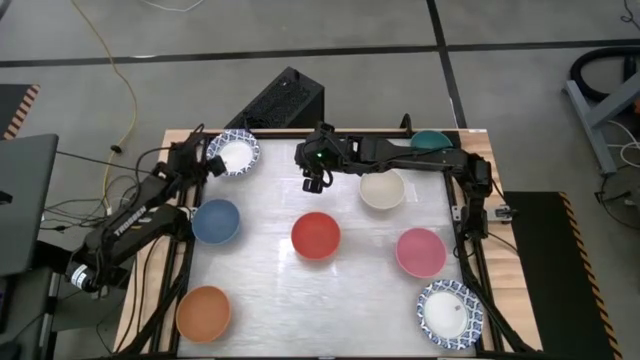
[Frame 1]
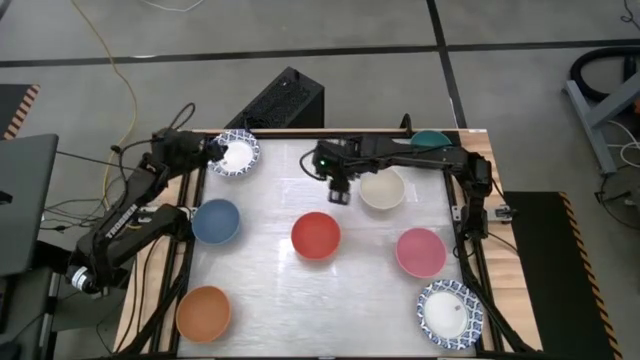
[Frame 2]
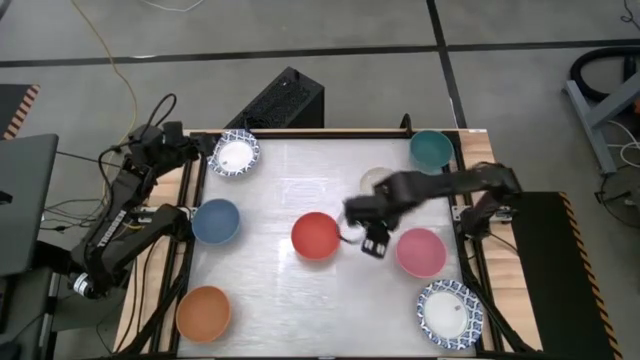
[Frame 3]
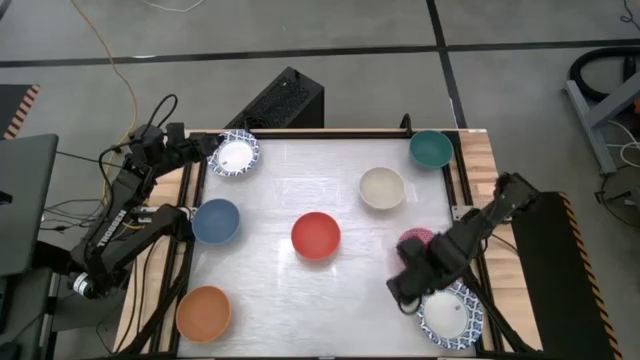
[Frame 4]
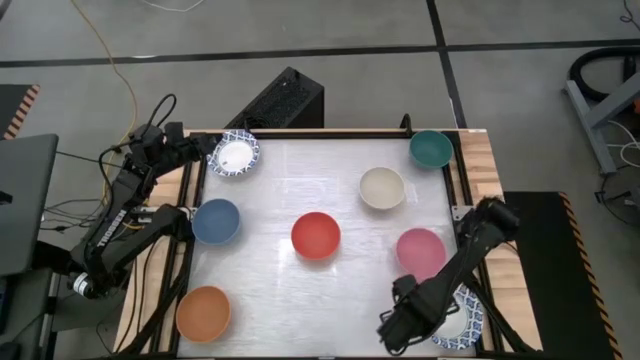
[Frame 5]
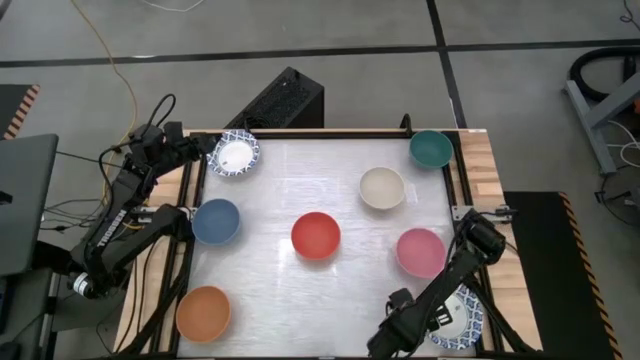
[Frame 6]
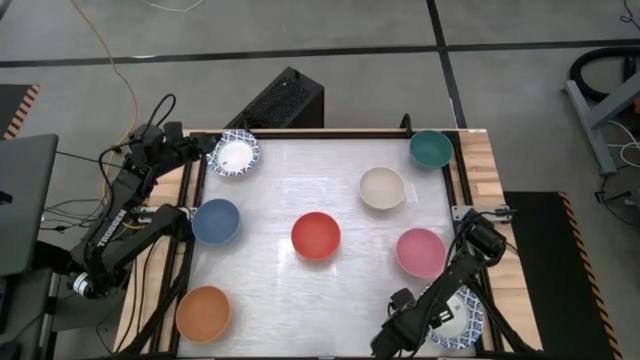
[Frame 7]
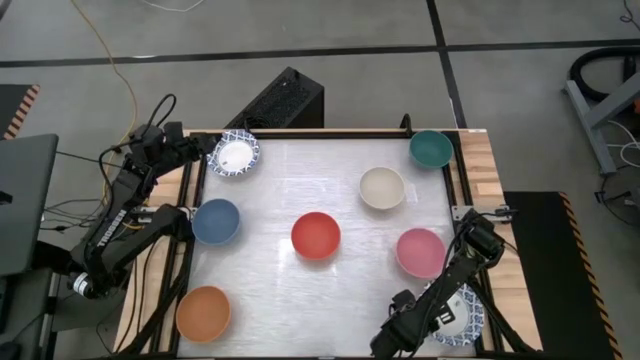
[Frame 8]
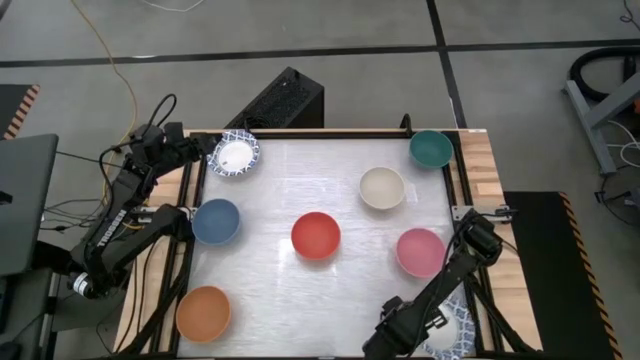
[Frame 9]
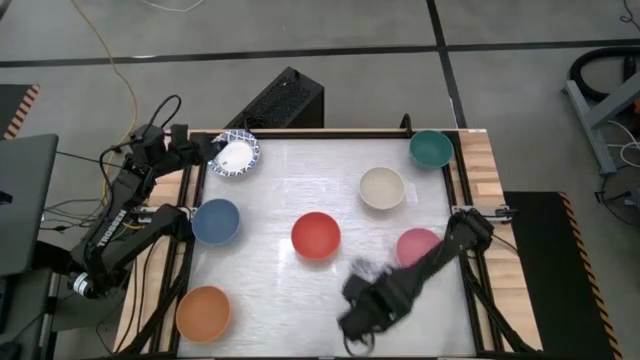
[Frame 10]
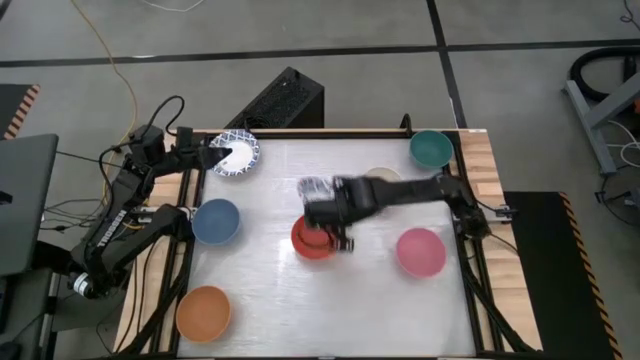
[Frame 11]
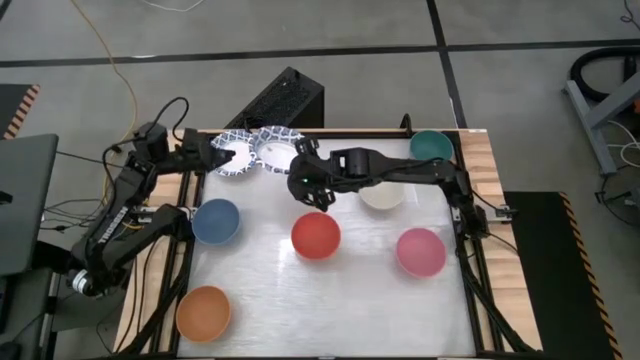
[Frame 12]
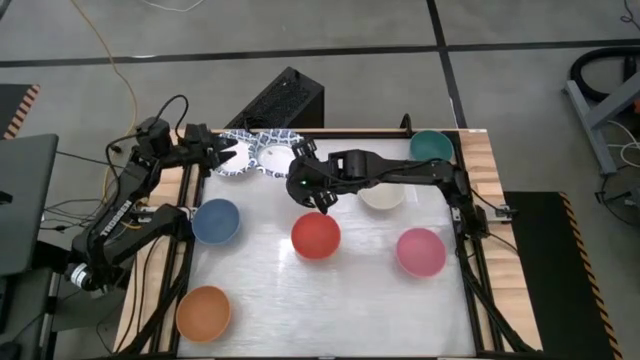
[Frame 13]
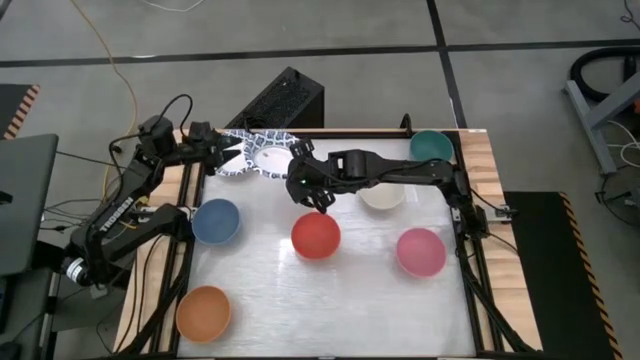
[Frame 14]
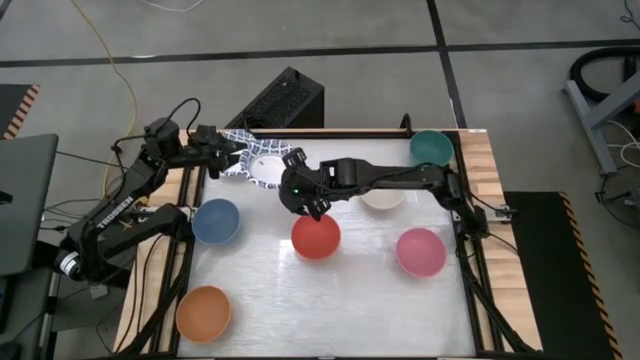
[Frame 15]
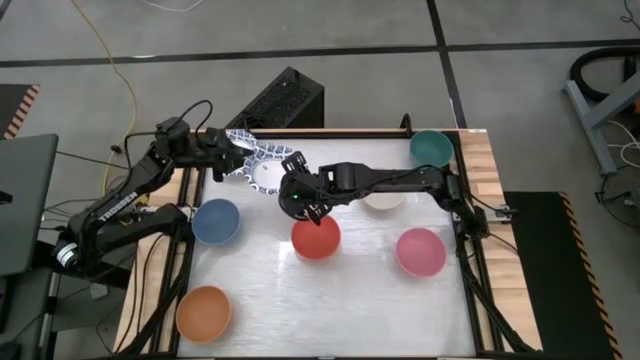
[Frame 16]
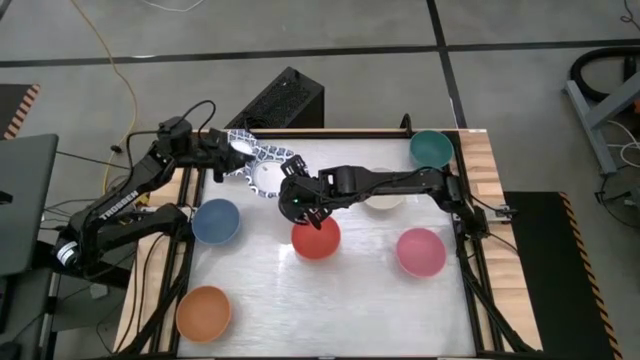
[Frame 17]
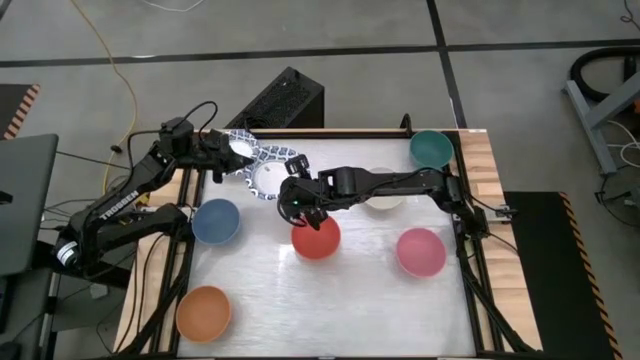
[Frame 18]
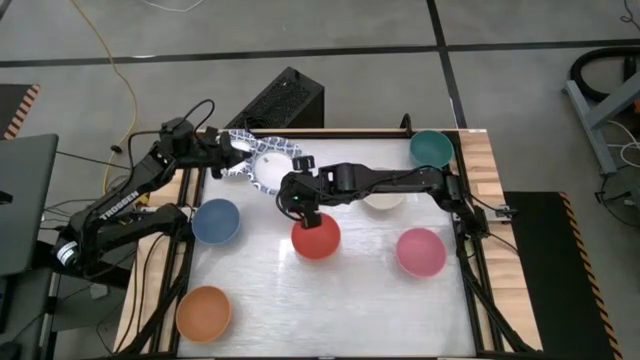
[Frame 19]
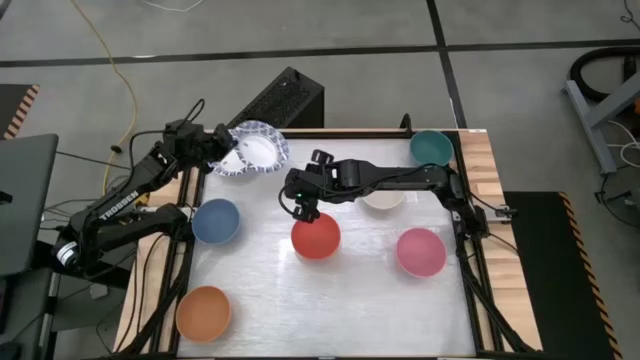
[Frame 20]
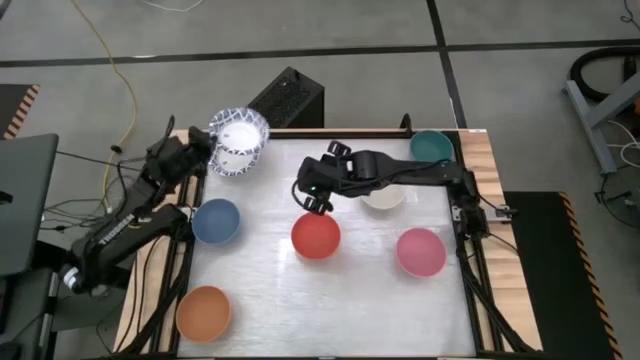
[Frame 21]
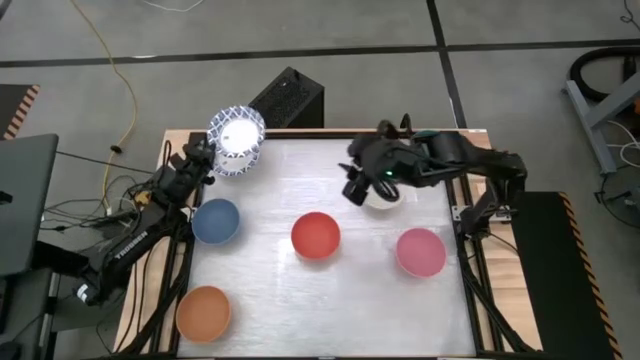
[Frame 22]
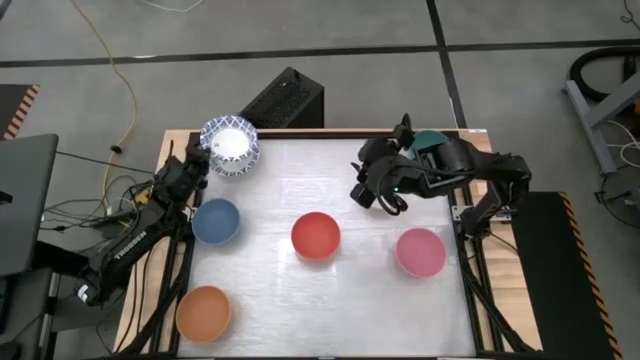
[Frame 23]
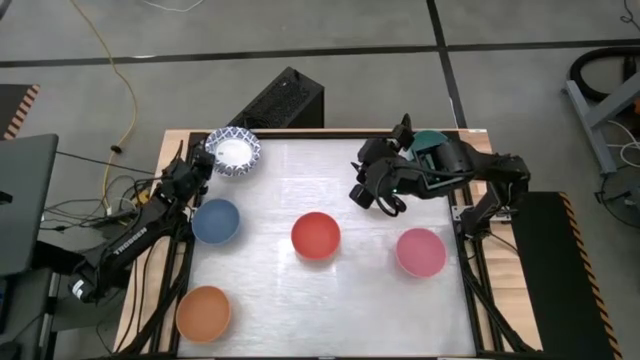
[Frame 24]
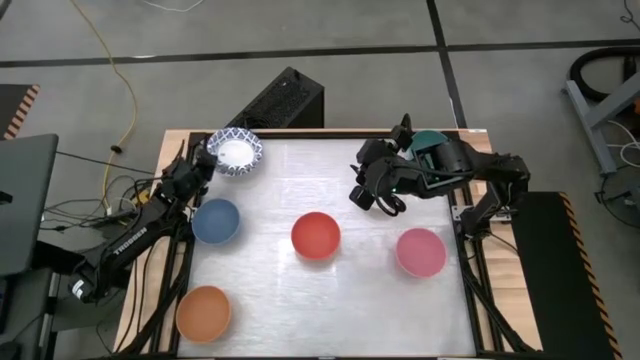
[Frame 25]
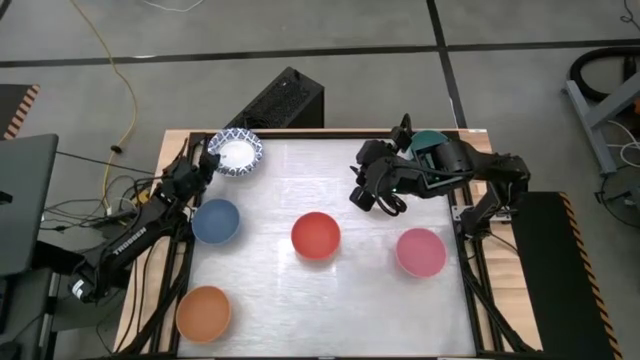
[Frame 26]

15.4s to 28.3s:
Stack the bottom white patterned bowl on top of the top white patterned bowl

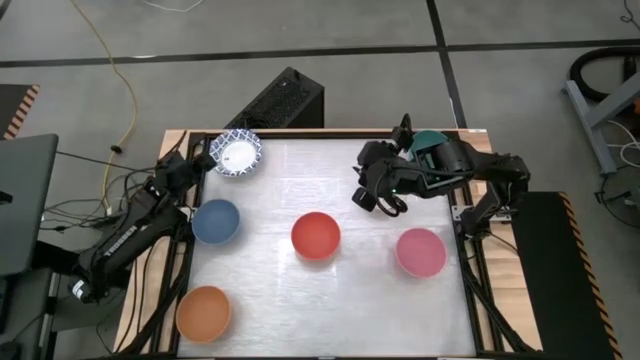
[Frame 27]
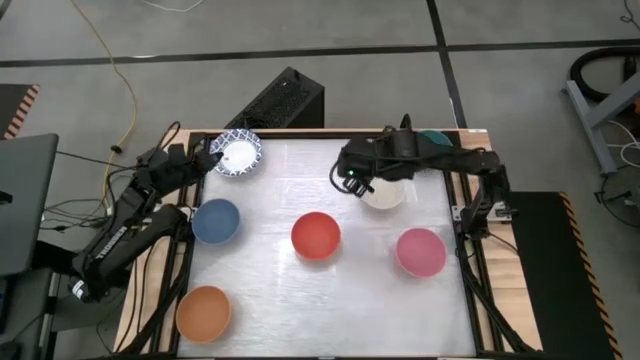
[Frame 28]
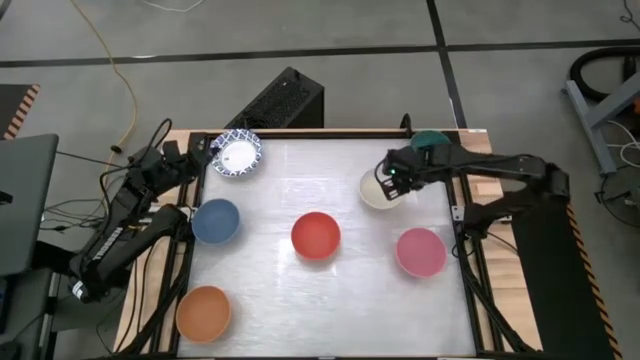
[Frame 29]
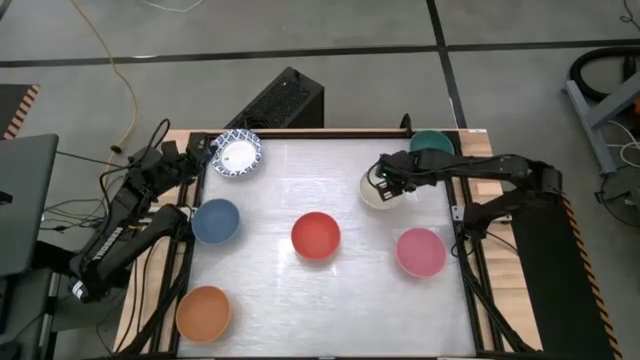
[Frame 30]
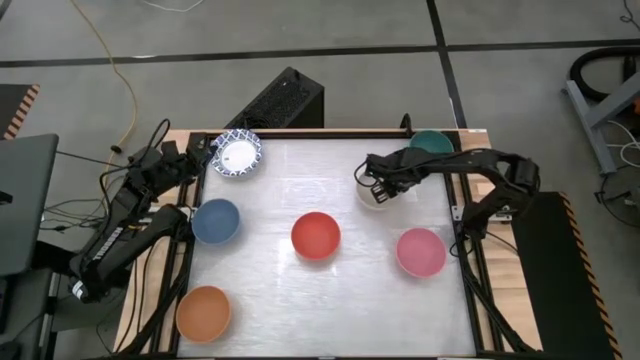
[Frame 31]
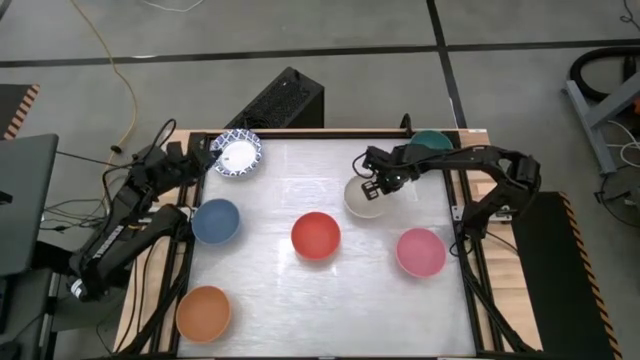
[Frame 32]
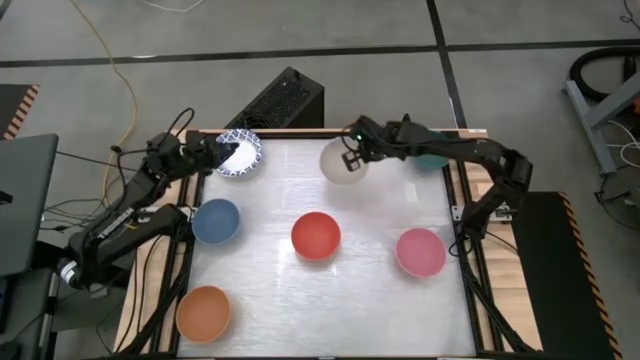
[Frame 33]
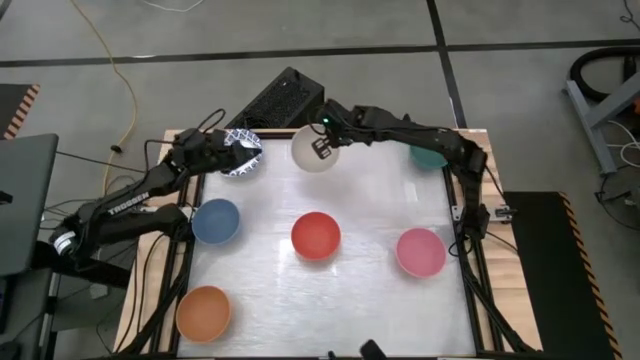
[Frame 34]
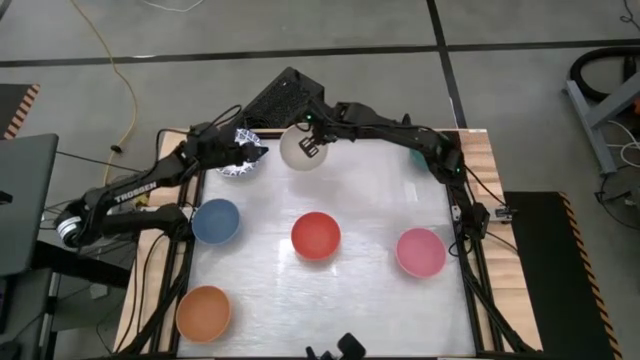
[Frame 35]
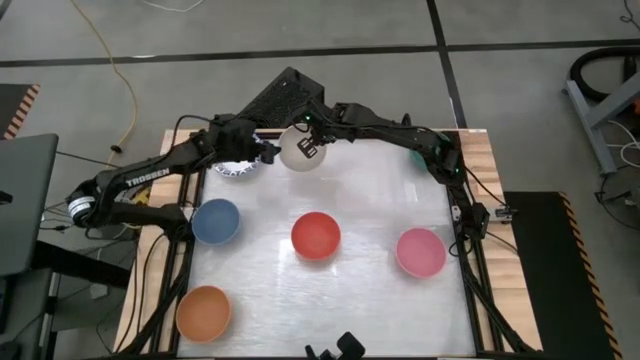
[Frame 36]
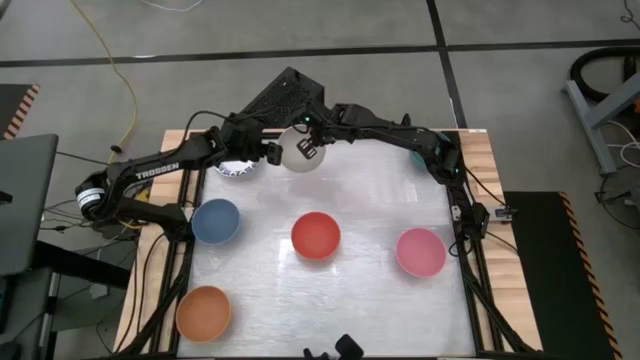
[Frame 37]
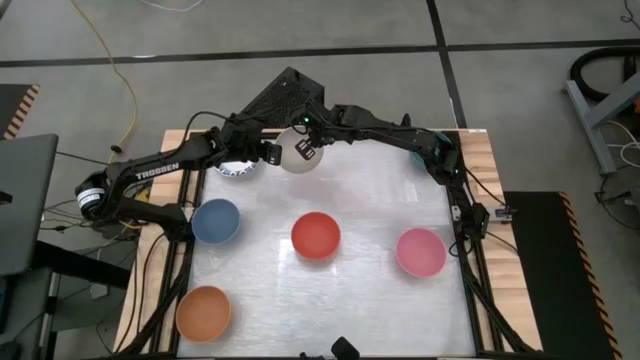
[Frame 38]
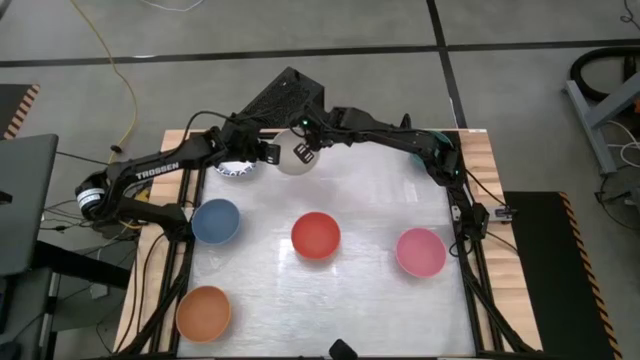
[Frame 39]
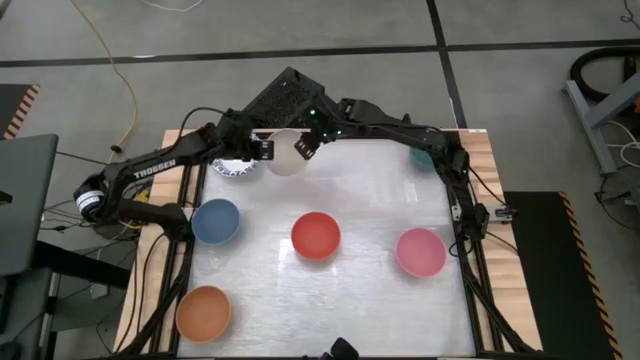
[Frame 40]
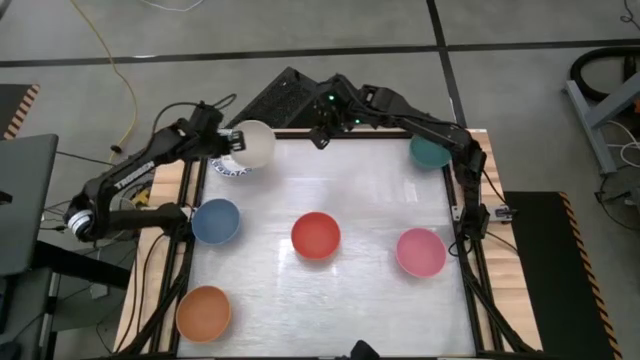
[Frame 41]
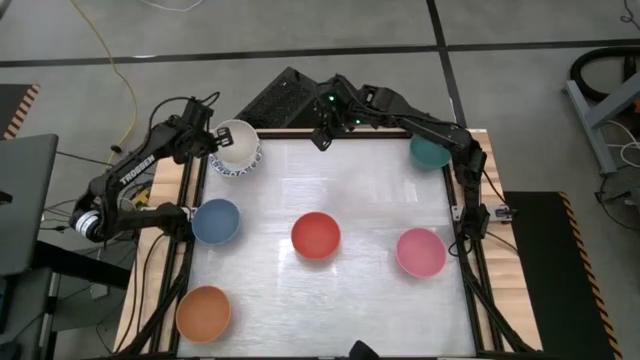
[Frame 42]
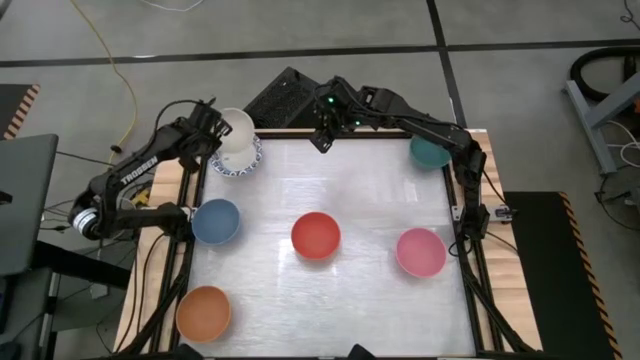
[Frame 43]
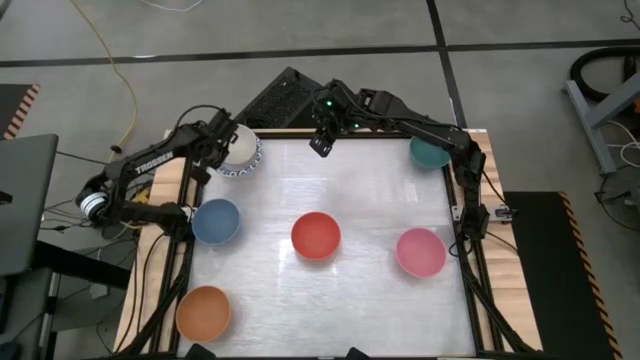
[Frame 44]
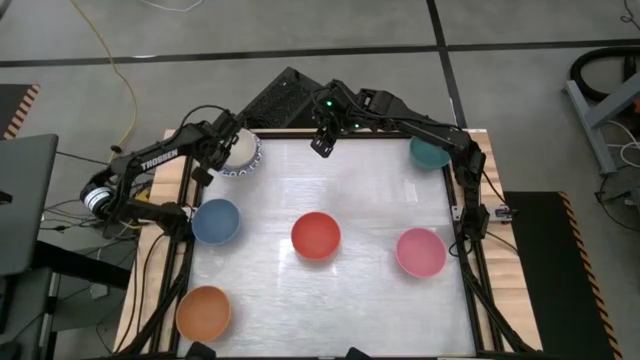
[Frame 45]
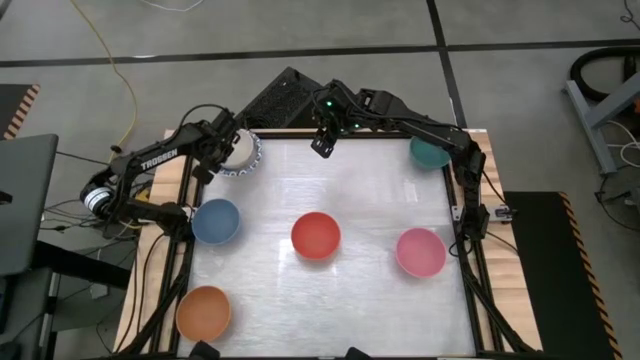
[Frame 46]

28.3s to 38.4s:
Stack the white bowl on top of the white patterned bowl
